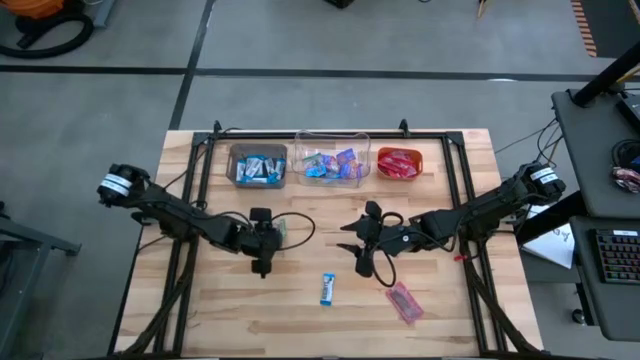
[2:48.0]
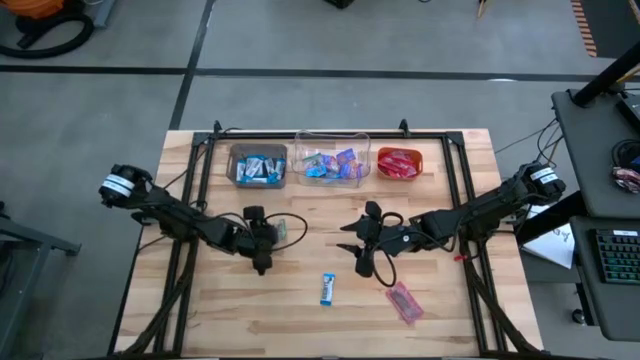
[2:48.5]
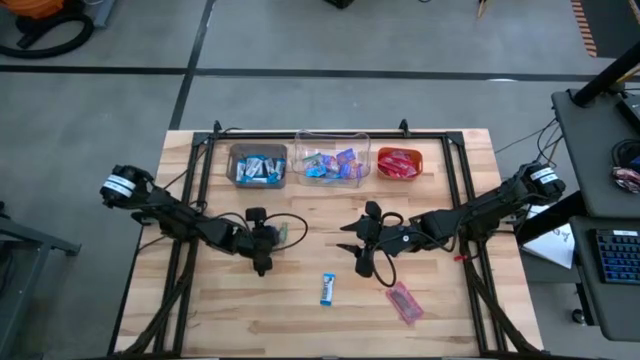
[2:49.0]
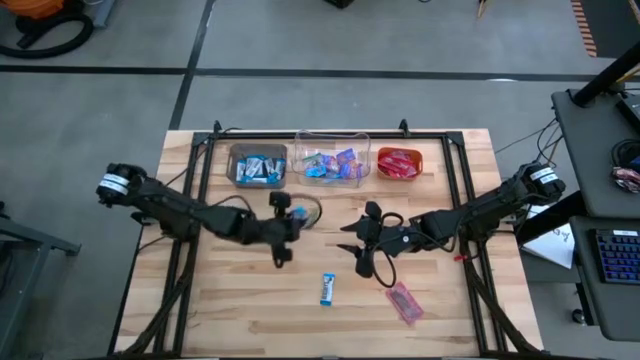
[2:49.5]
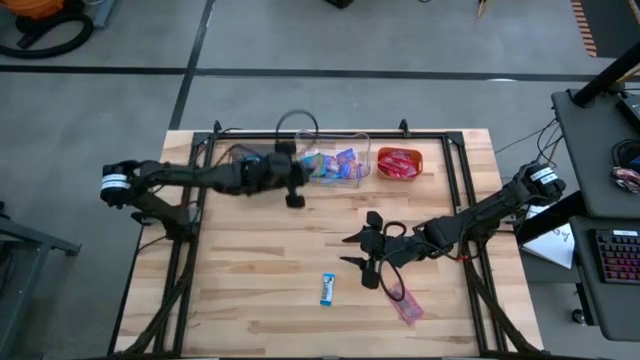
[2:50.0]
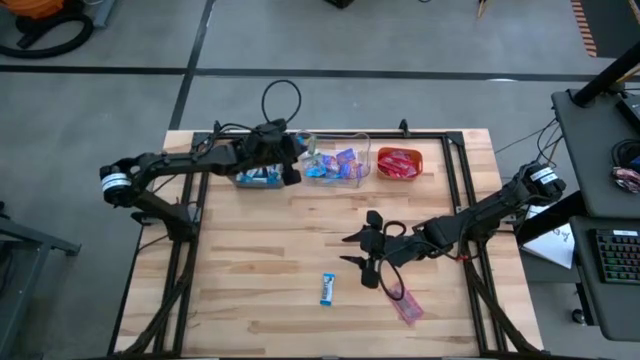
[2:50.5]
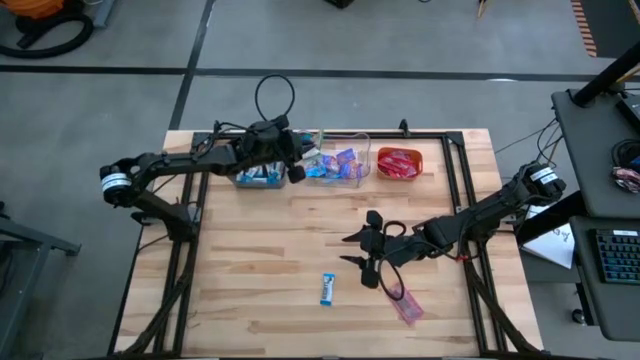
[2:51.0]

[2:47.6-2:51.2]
Task: Sort candy
Put the light blue candy into the transparent bin

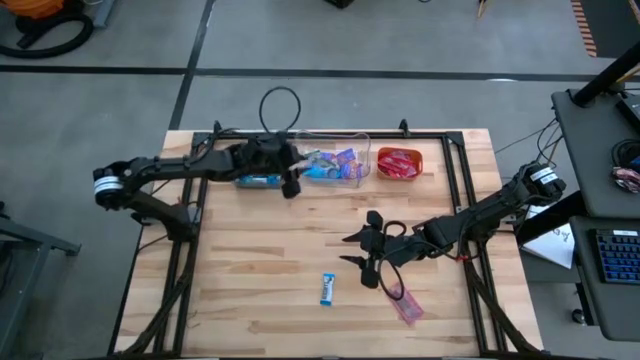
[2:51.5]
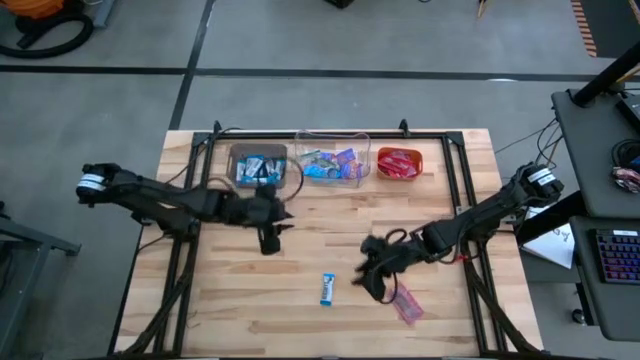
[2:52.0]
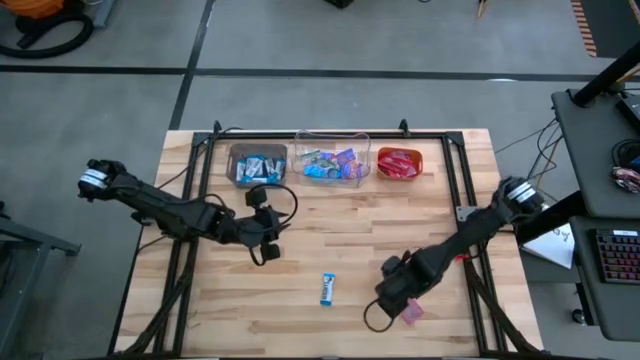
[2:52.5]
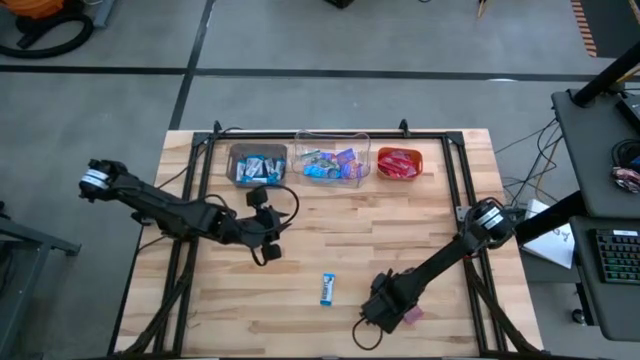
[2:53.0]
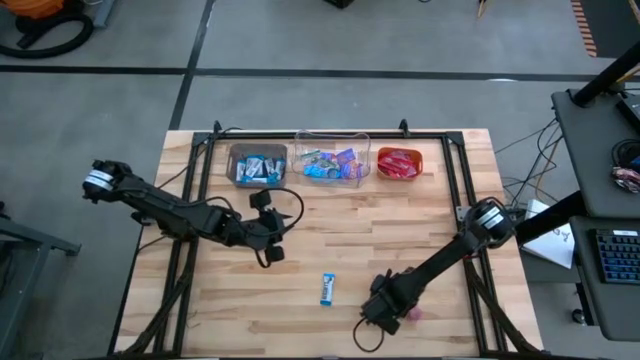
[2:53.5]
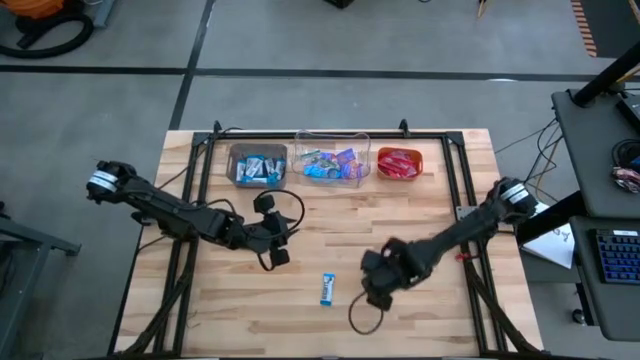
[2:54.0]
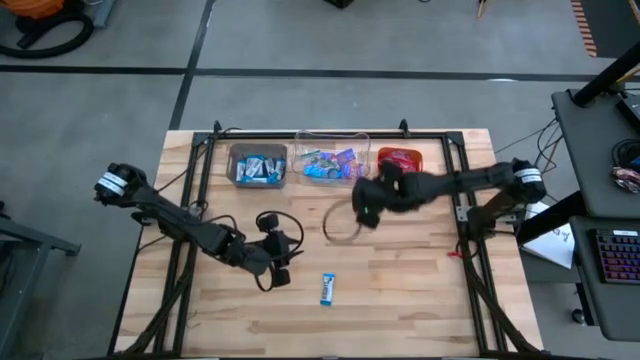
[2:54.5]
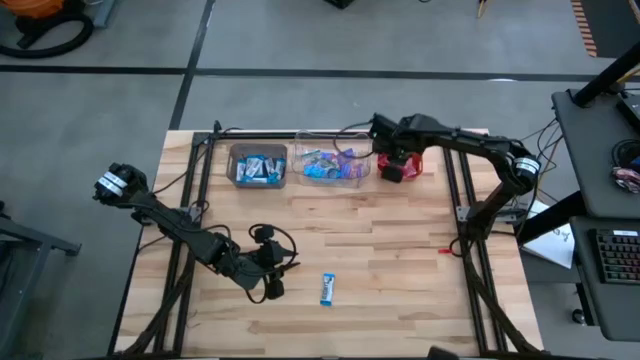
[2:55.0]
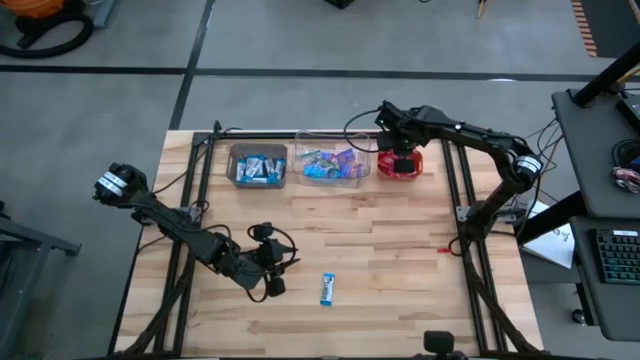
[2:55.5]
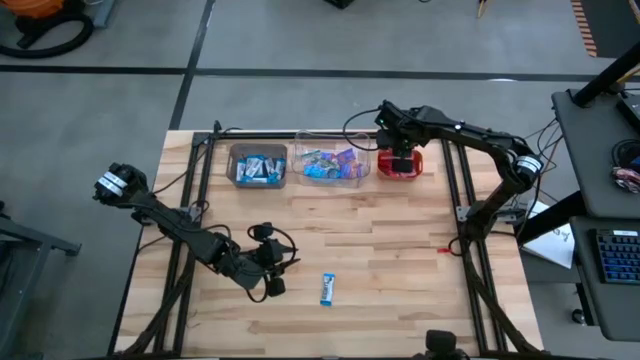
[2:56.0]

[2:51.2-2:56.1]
Put the red candy into the orange bin

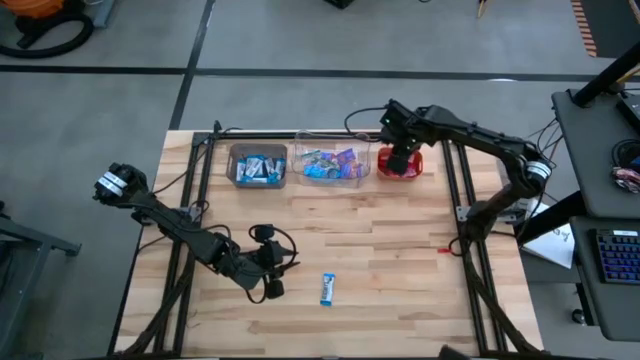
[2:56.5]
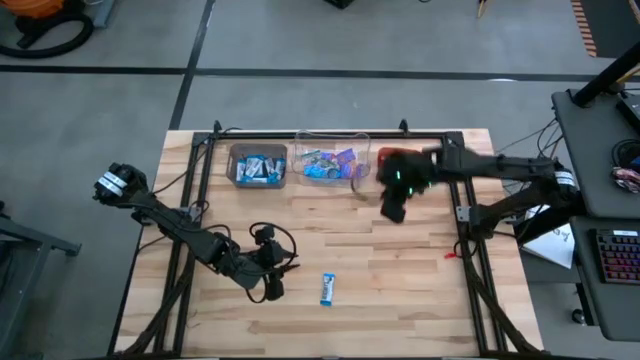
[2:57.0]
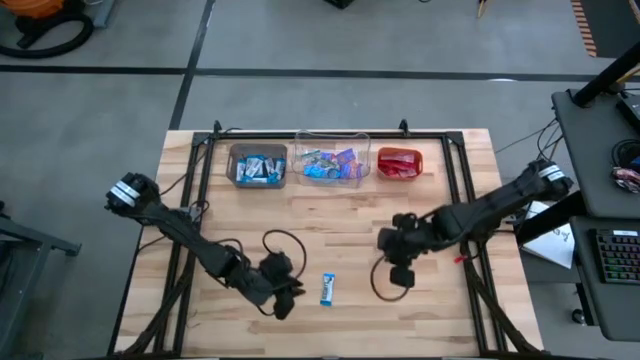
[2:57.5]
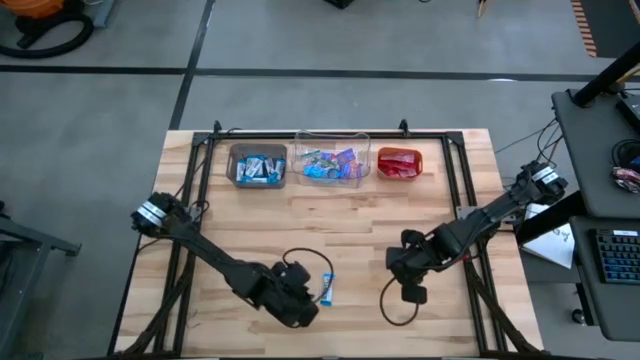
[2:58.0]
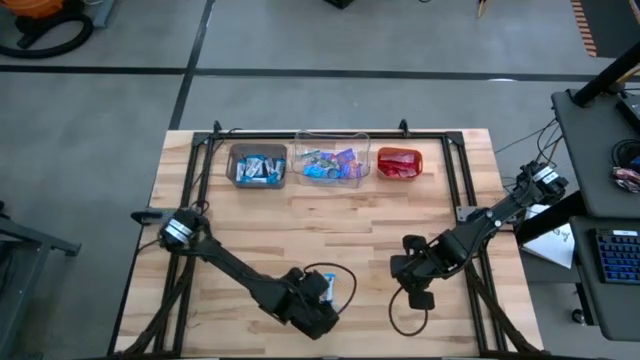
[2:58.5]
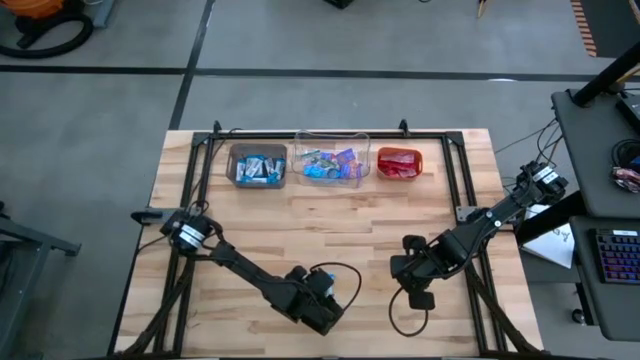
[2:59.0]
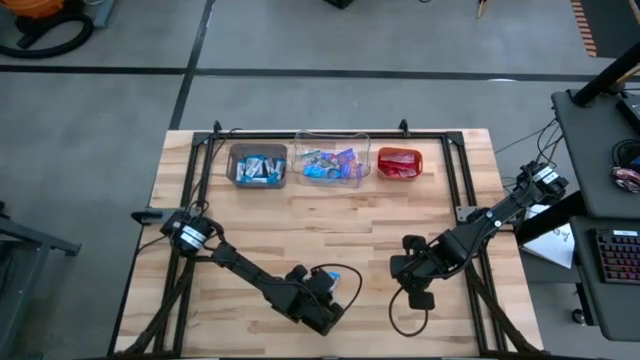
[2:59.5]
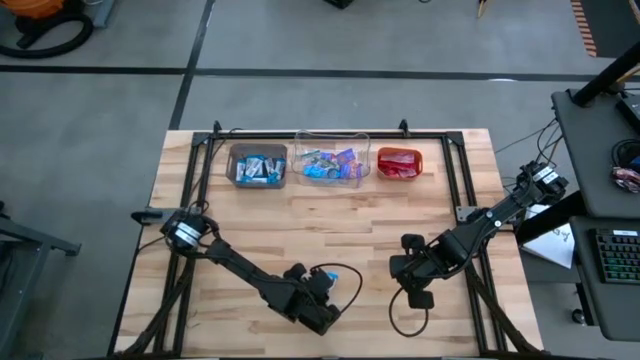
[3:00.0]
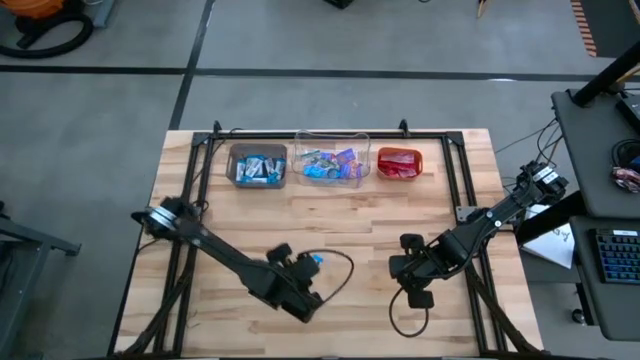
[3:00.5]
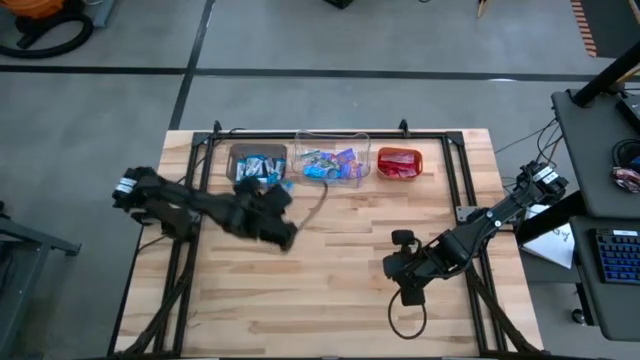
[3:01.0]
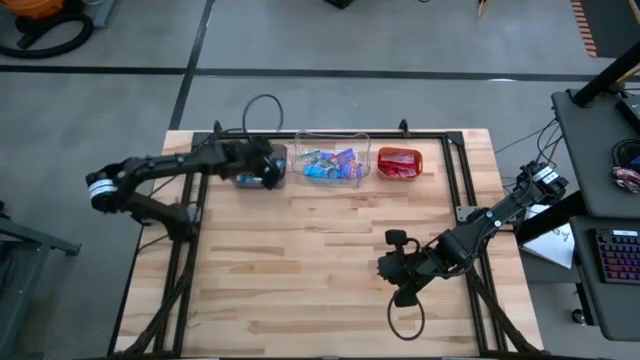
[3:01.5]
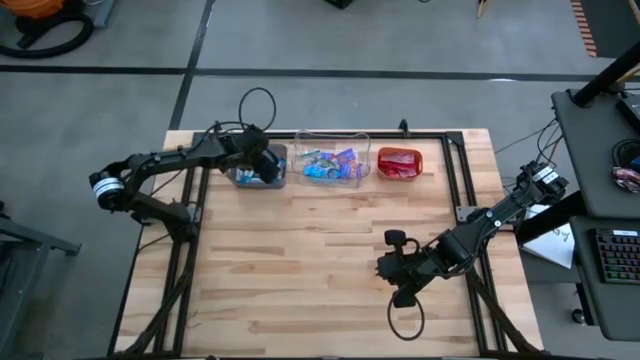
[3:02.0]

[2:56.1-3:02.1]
Put the white candy into the black bin

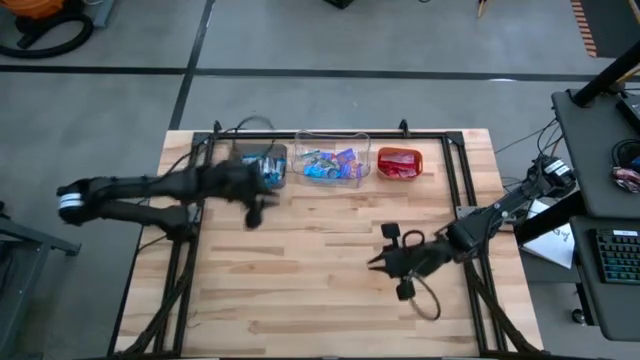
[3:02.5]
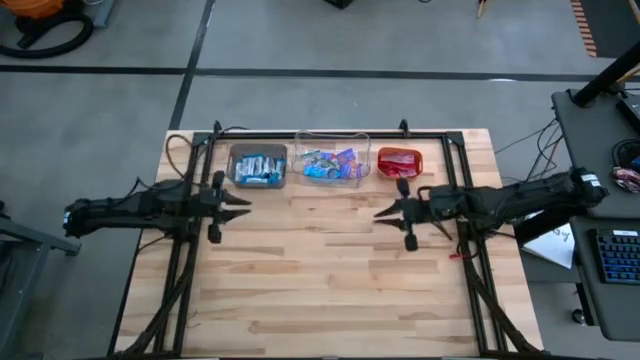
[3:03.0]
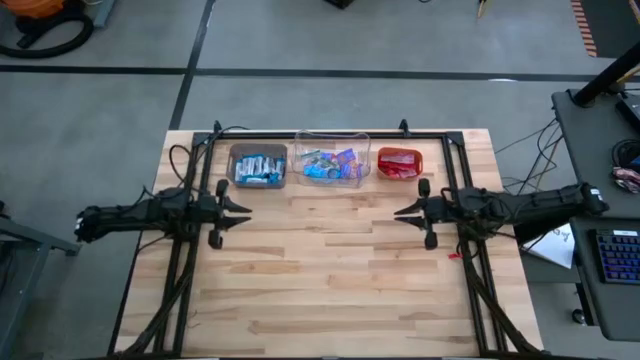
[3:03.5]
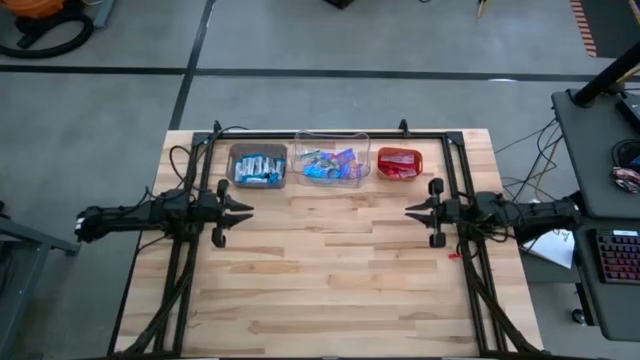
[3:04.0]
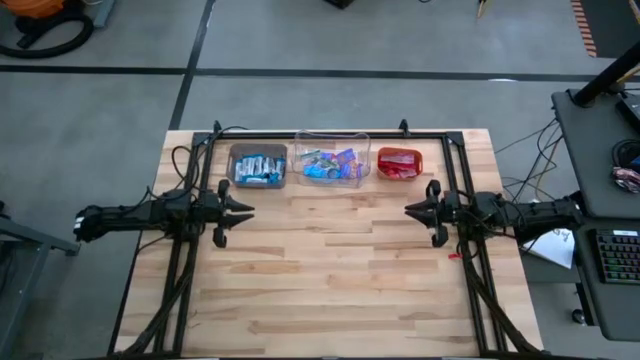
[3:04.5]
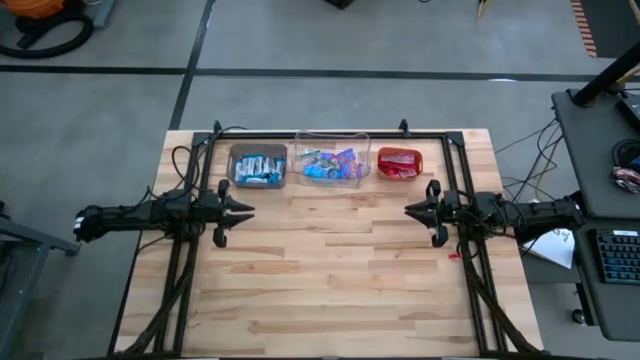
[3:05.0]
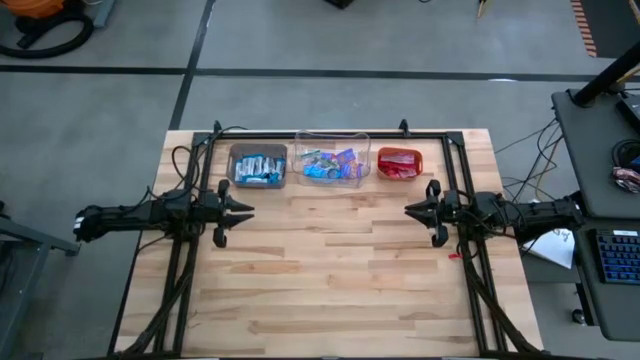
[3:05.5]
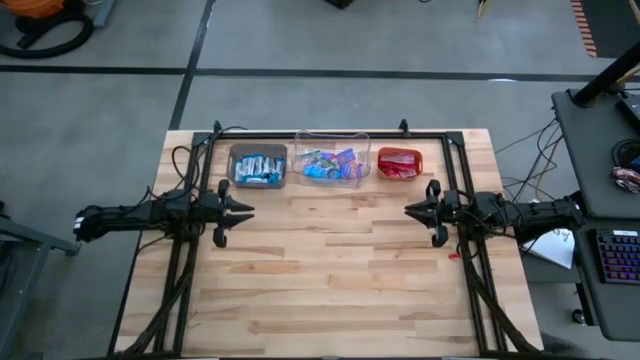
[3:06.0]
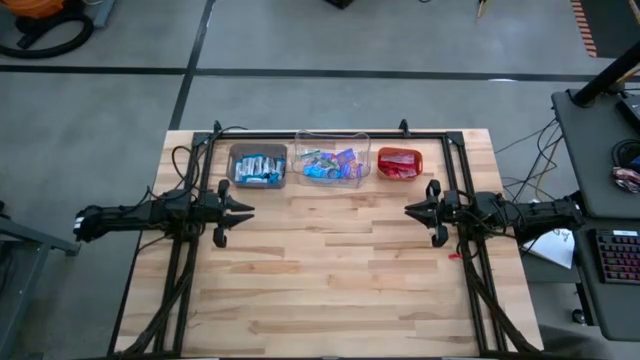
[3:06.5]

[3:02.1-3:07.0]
Return to Home Position
